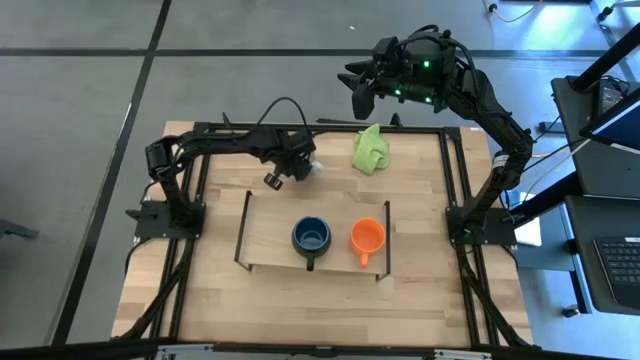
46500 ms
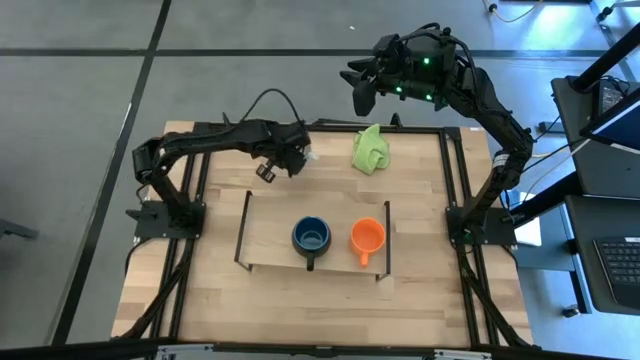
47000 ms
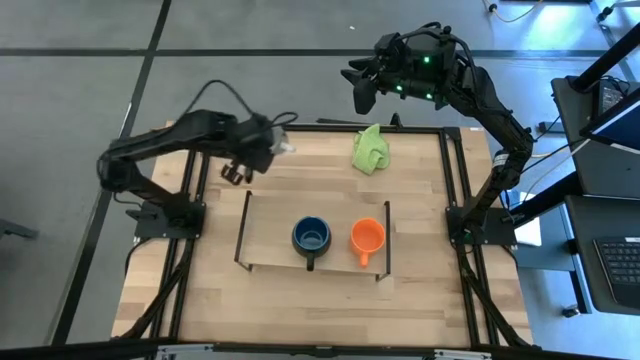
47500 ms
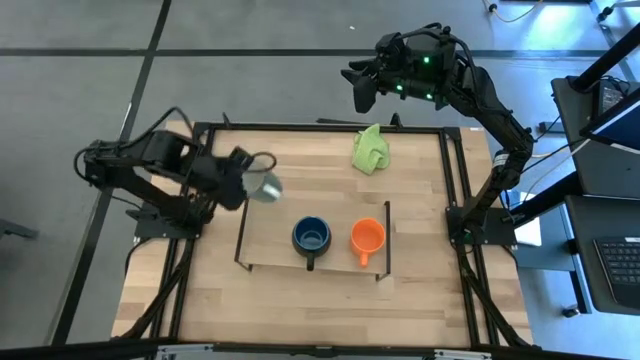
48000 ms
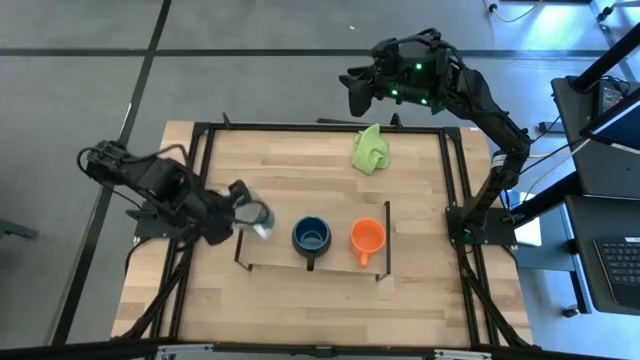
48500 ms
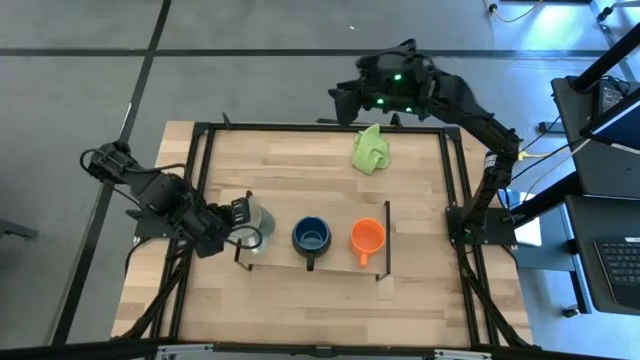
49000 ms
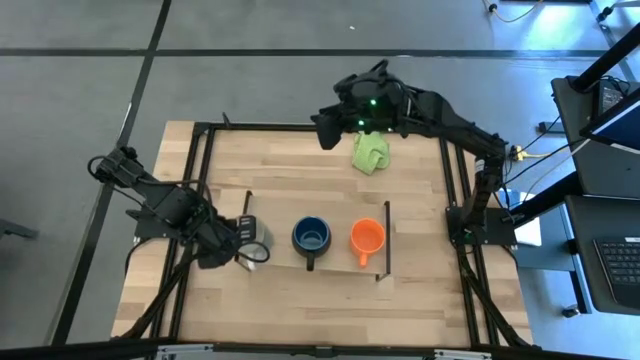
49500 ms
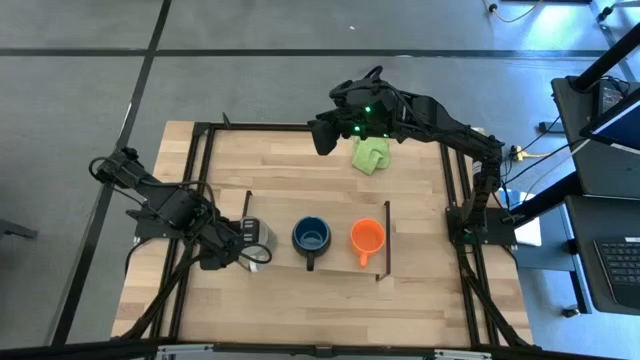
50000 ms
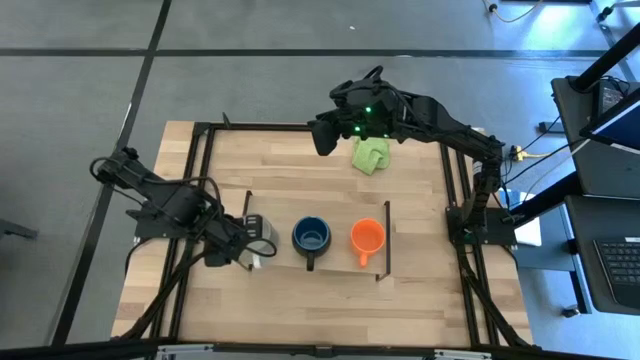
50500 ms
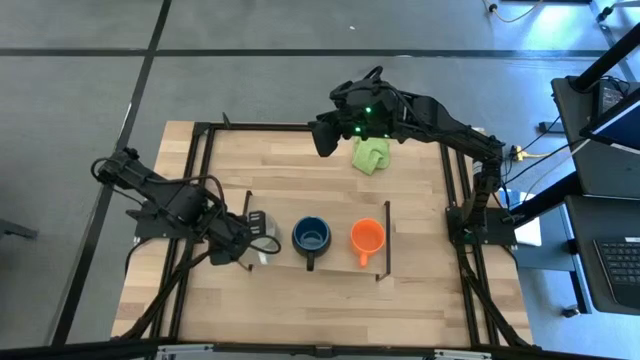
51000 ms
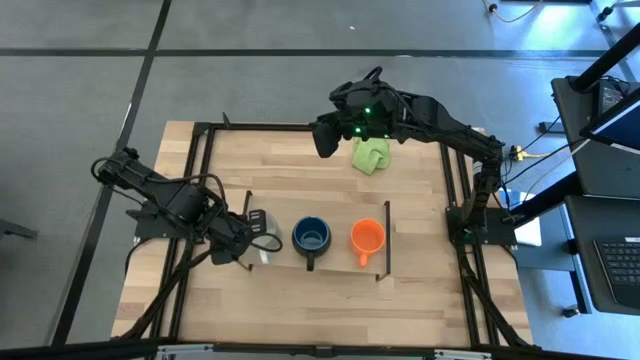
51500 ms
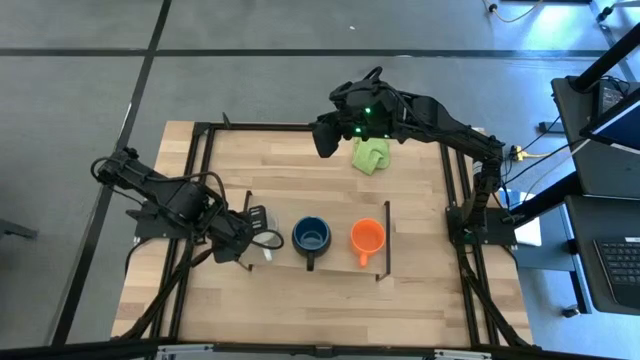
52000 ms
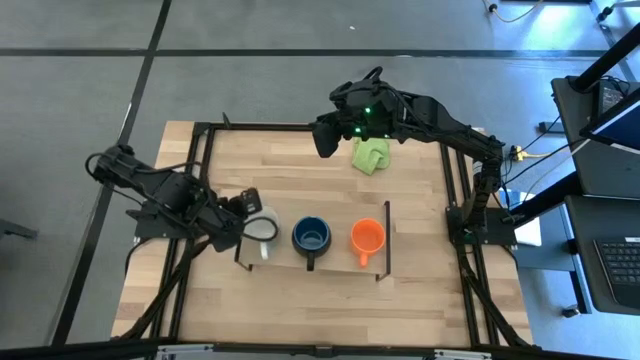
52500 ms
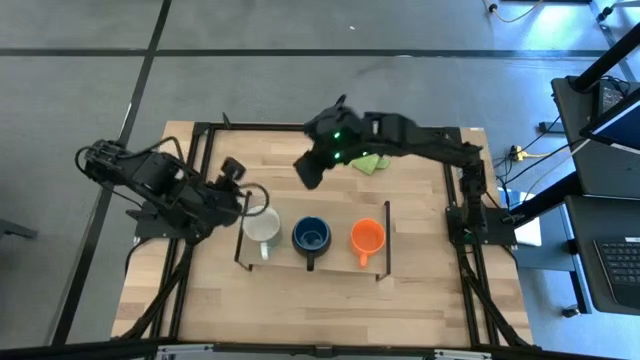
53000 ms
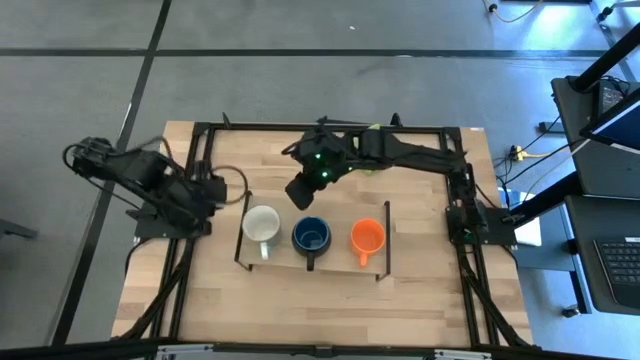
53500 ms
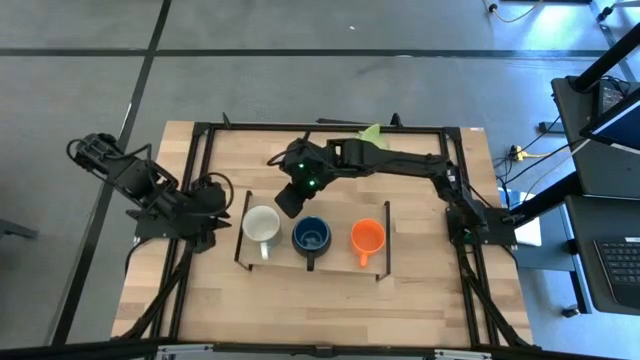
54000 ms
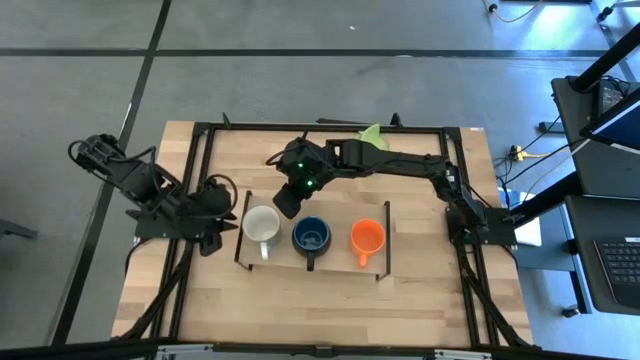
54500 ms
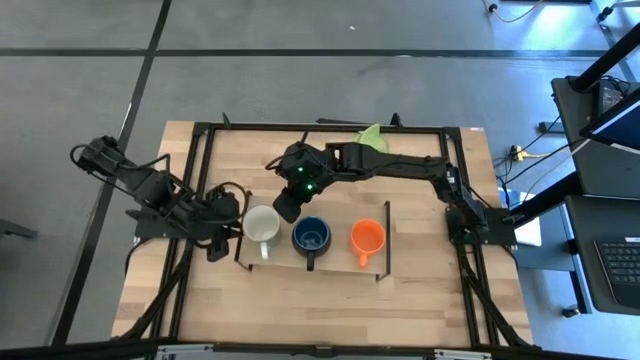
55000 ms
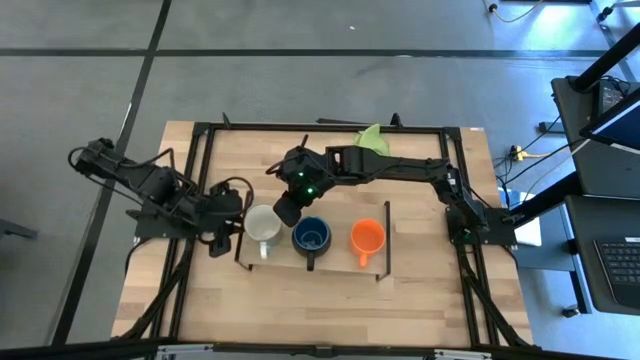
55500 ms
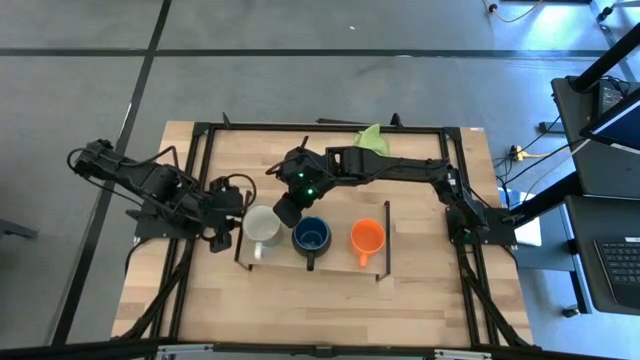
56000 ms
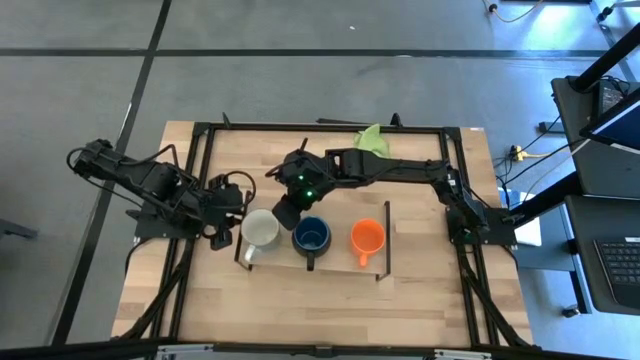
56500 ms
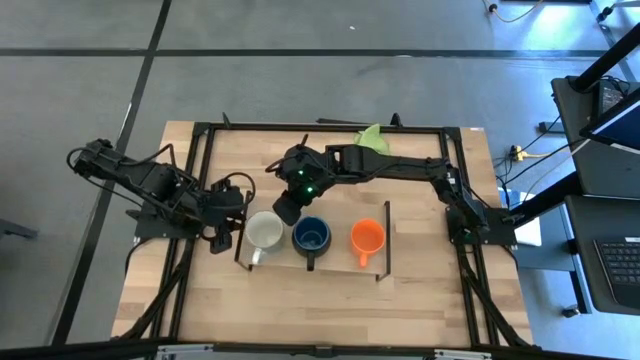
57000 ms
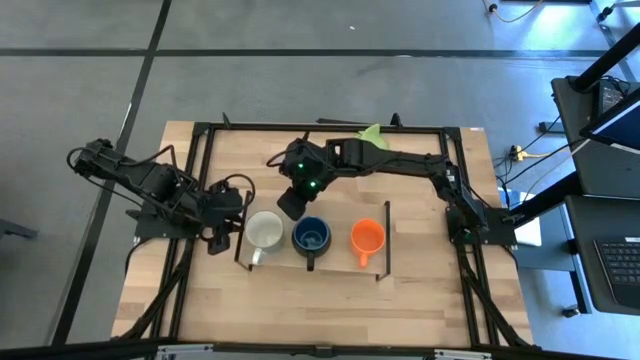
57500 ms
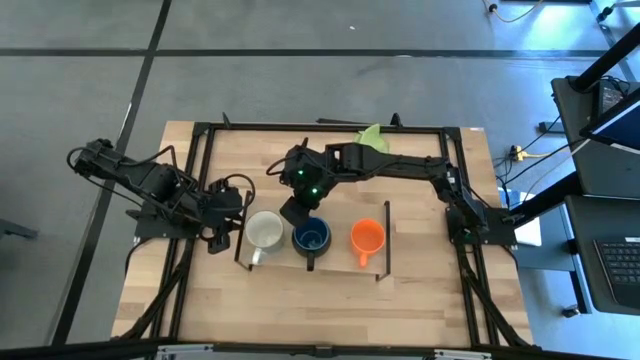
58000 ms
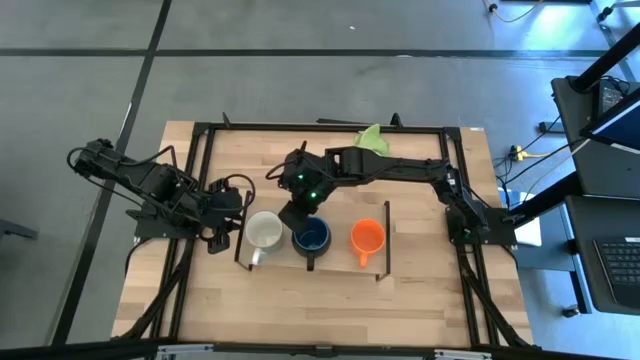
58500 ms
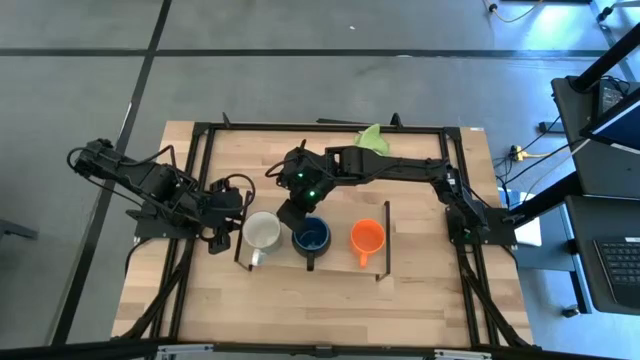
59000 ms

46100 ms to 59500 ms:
Task: Stack small to large cups/mugs on shelf
Put the white mugs on the shelf
